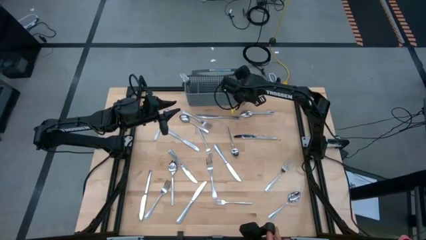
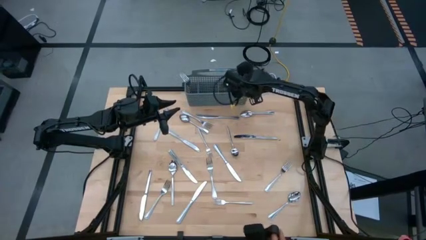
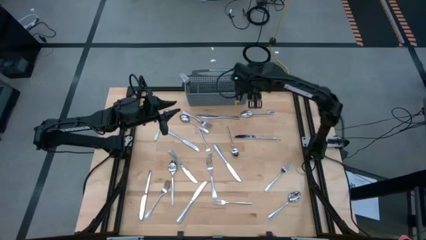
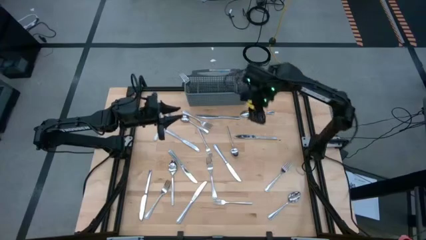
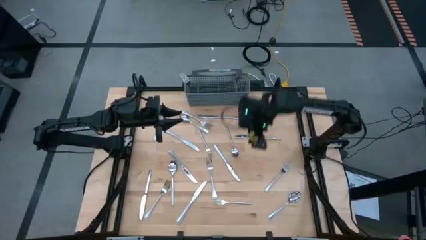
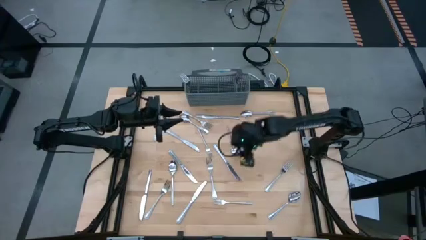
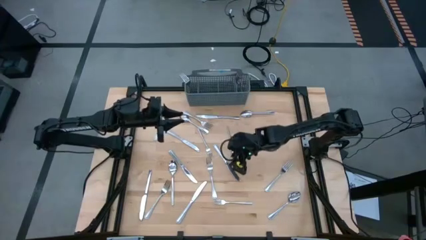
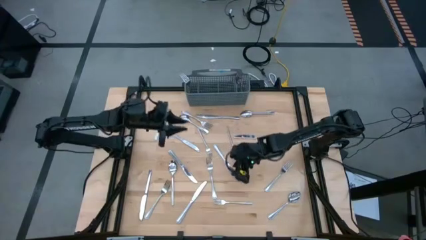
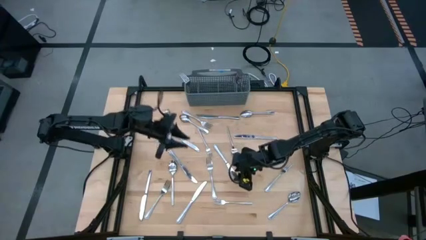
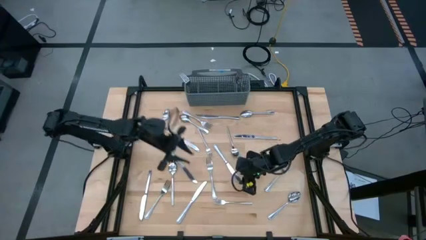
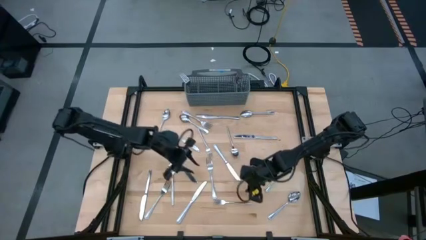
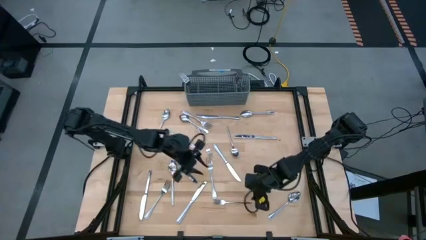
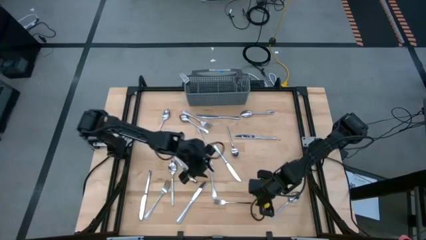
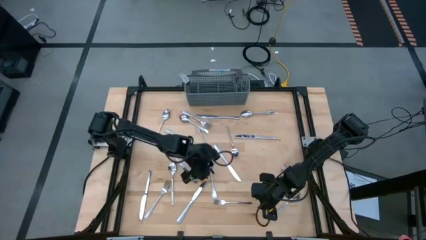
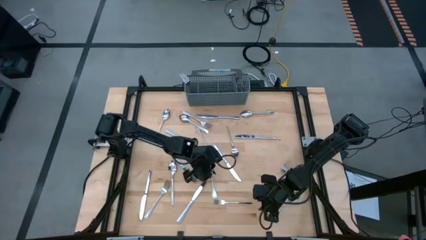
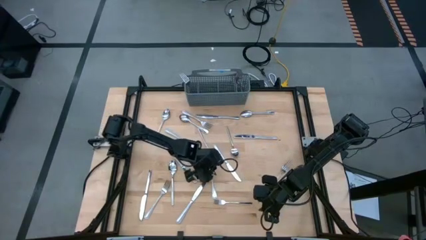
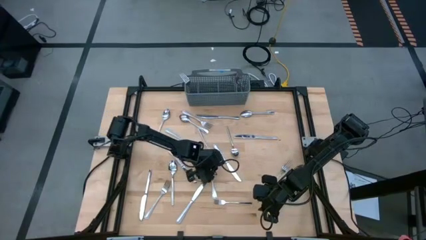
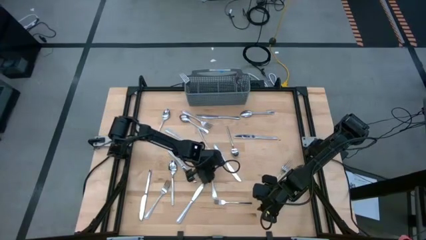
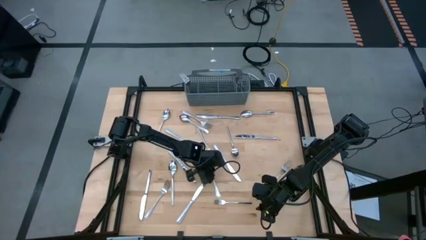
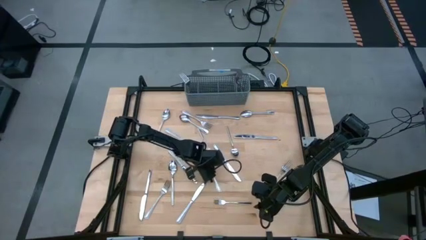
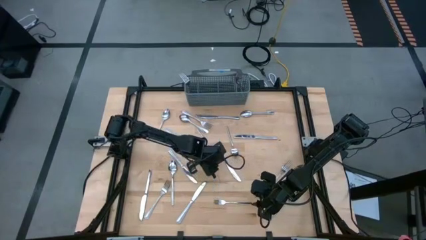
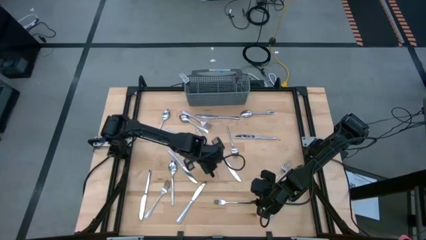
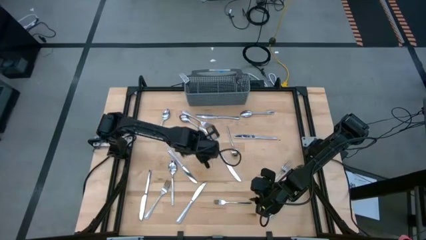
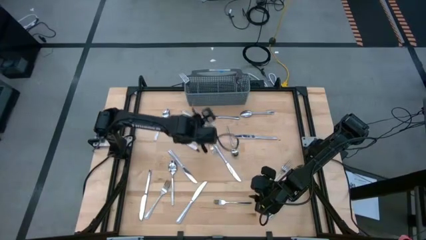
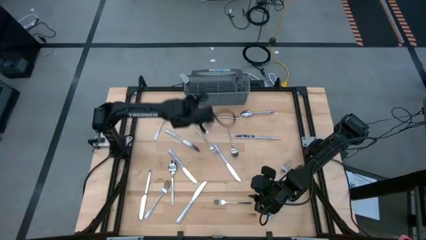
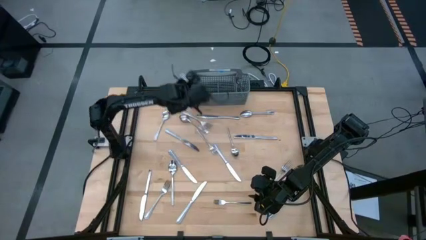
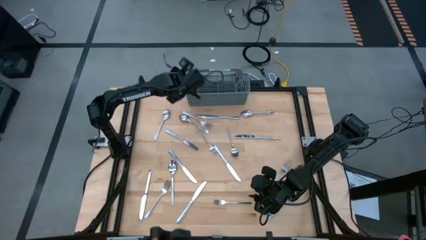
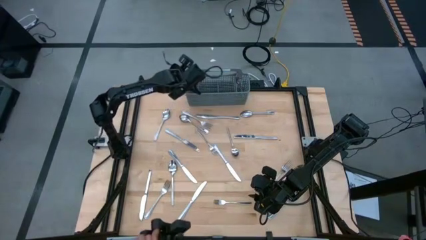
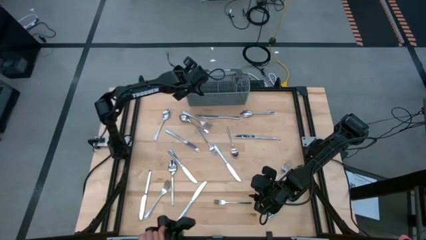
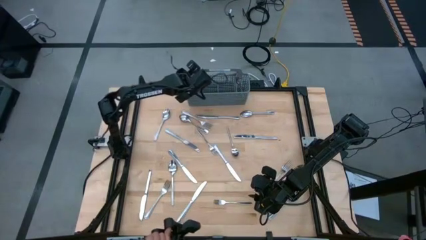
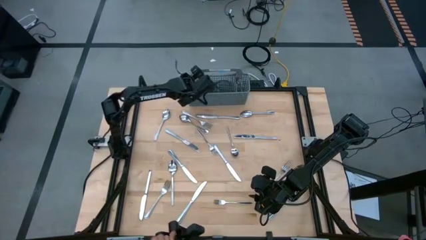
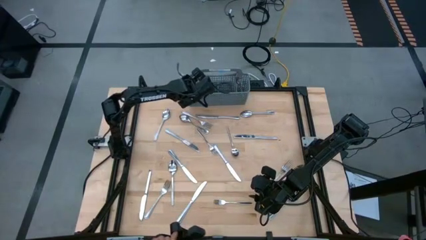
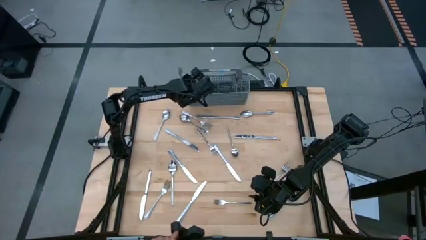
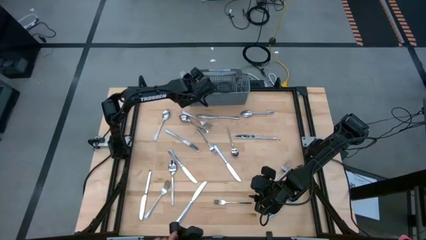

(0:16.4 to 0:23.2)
Task: Sort silverware
Put the silver fork into the silverware organizer

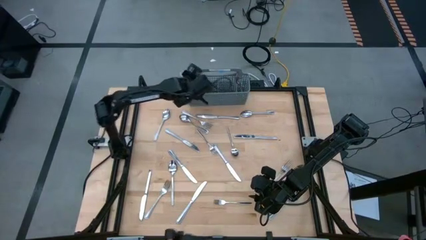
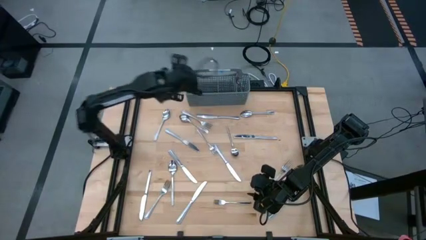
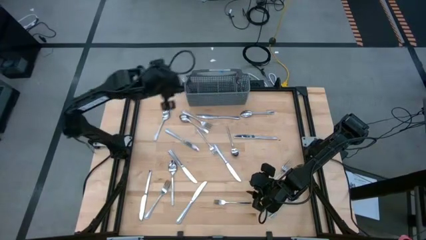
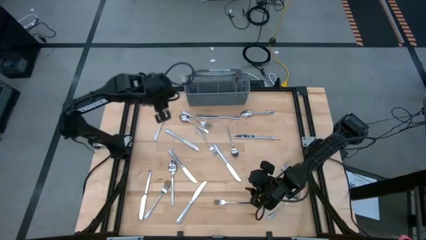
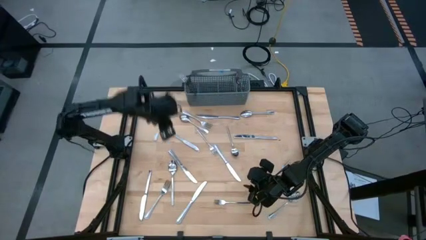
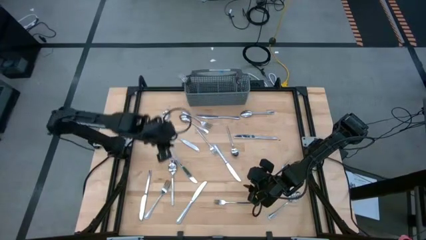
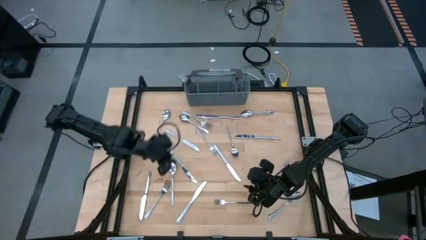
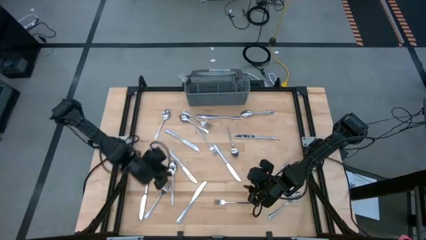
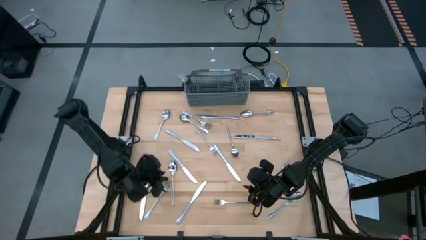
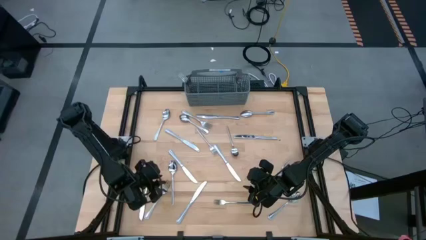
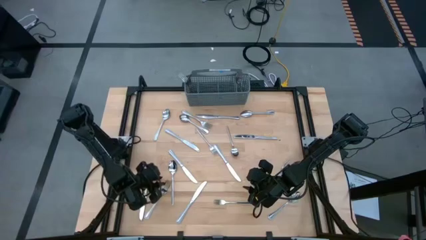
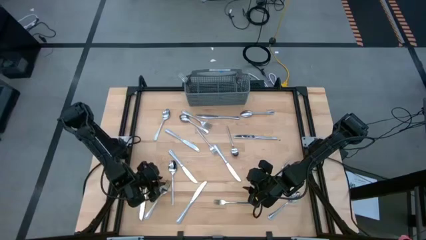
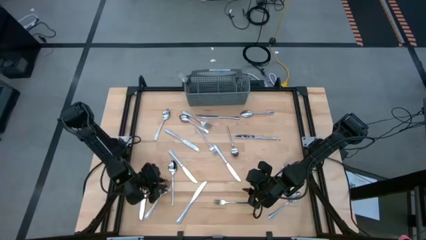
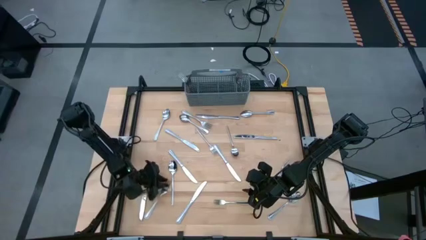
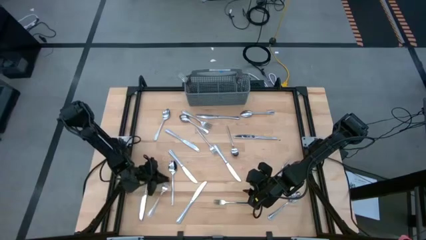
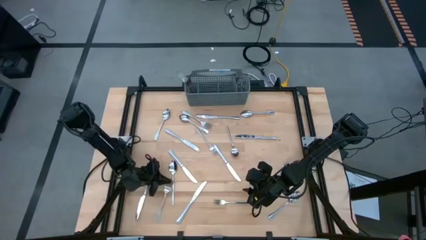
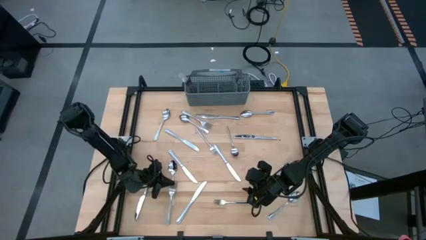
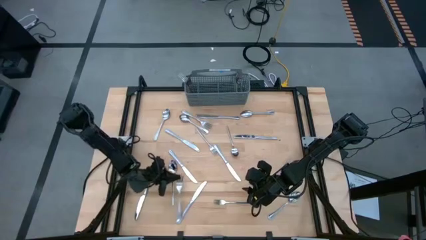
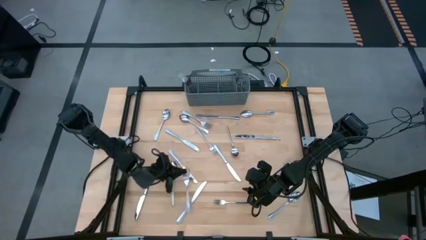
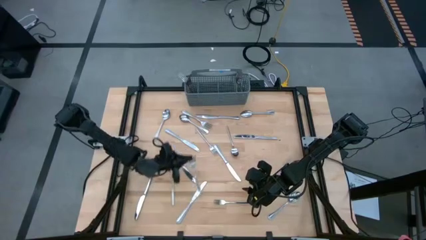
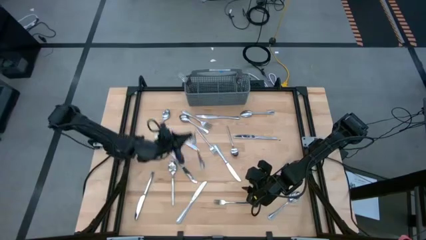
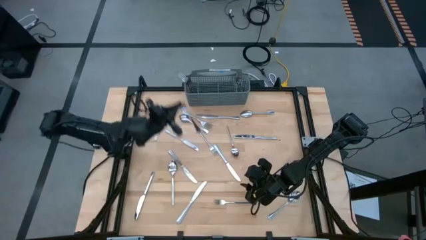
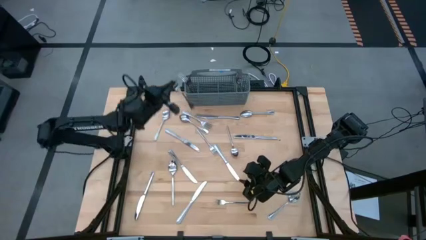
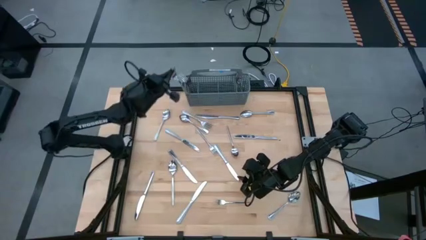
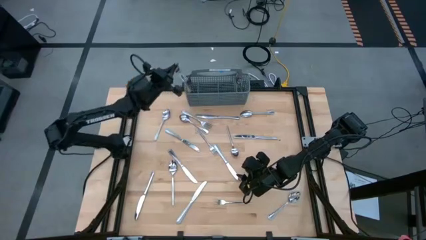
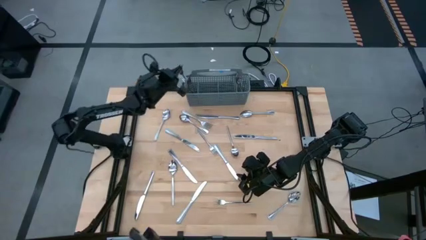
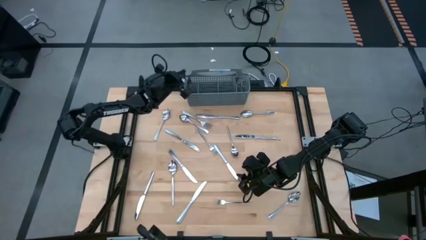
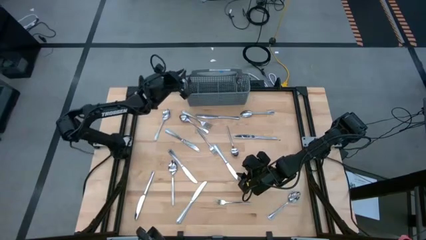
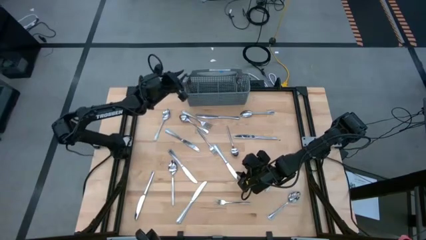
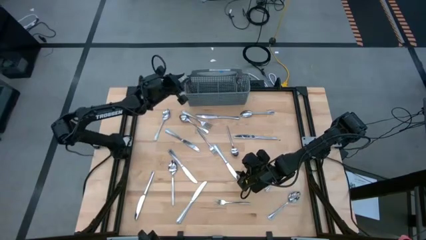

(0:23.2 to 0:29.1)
Put the silver fork into the silverware organizer

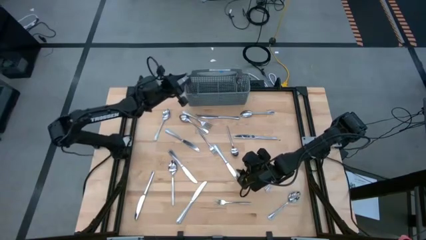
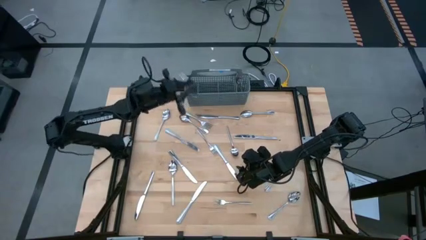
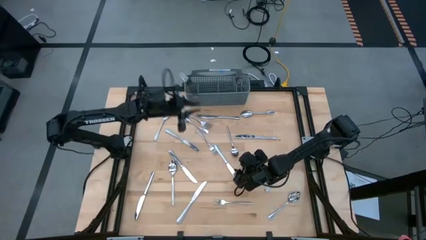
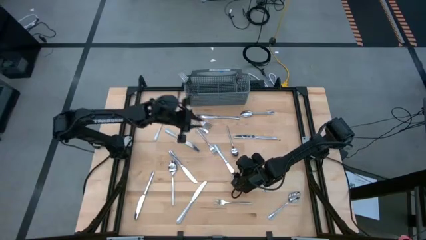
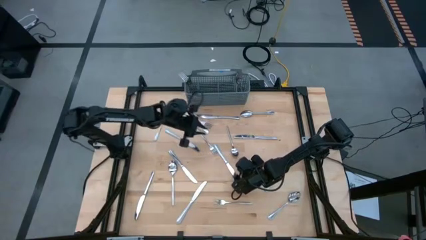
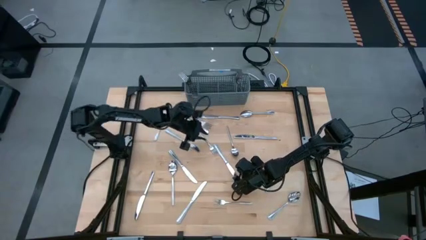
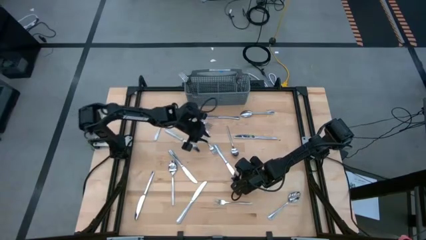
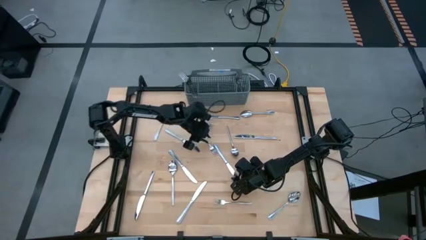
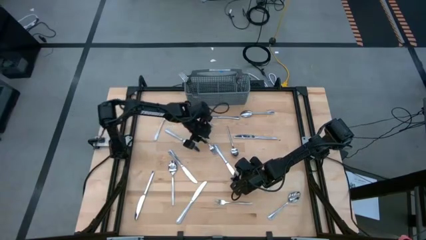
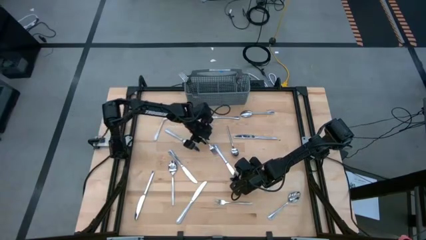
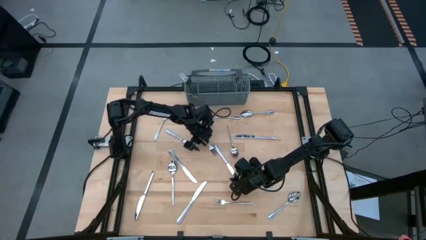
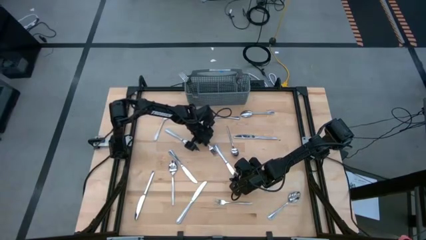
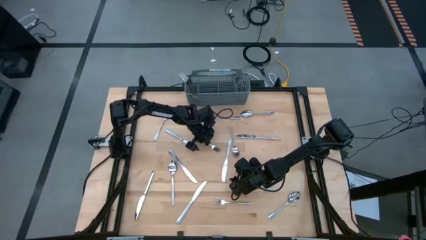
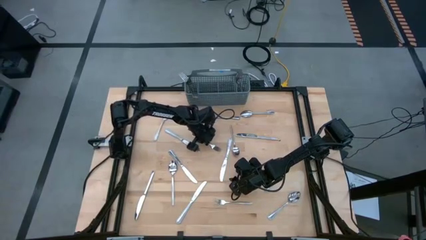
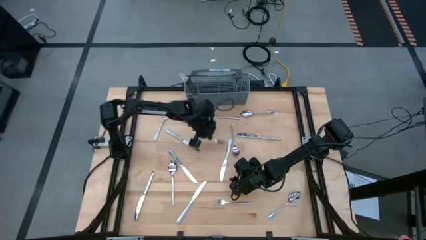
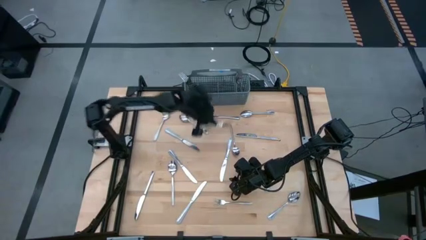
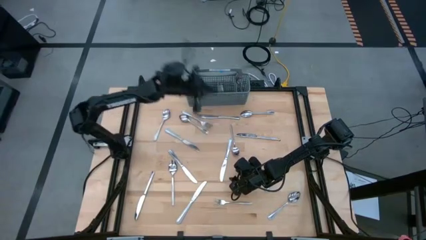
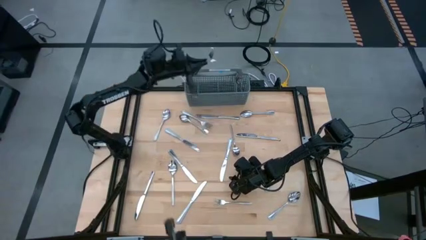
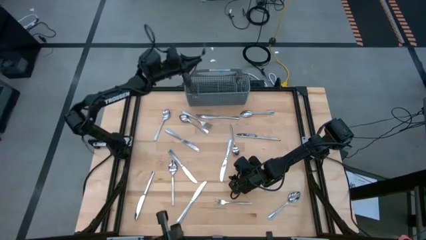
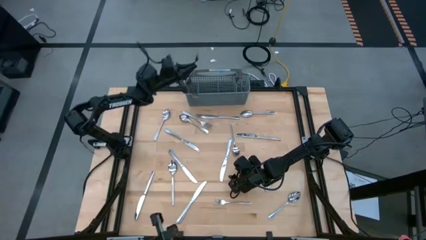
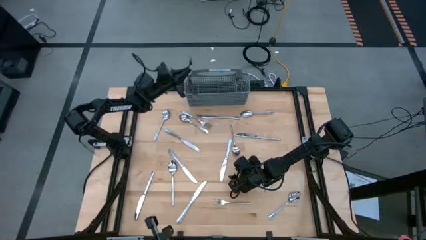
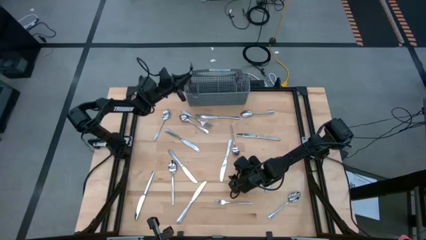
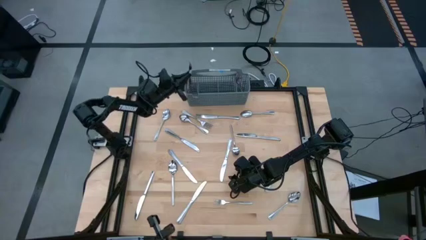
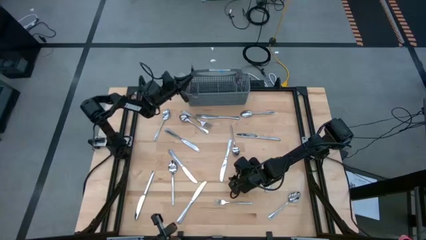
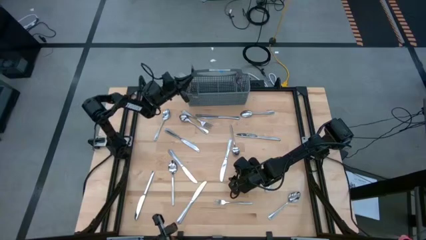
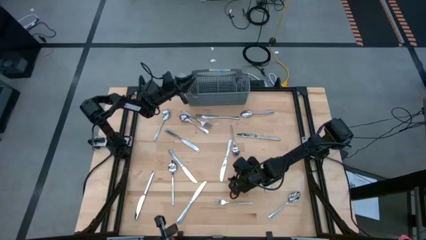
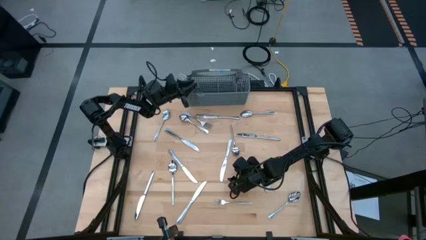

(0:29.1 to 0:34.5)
Put the silver fork into the silverware organizer
